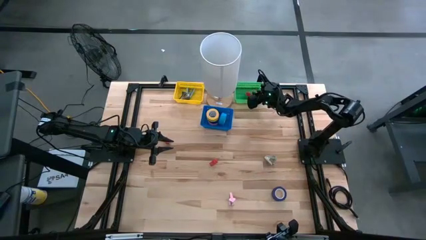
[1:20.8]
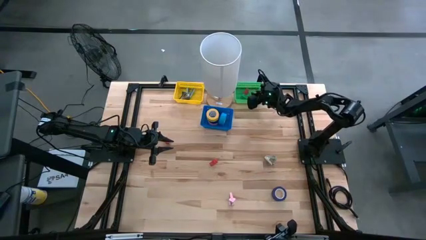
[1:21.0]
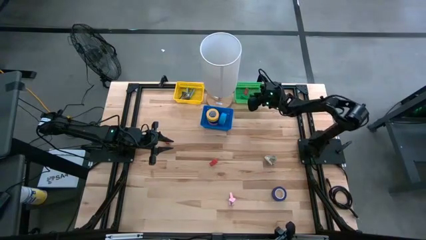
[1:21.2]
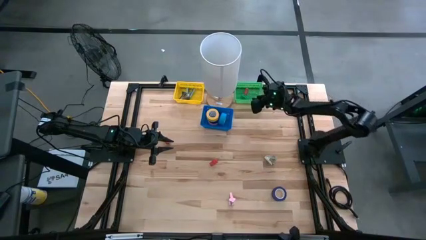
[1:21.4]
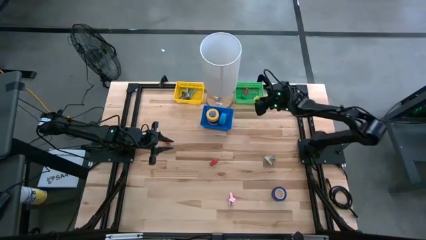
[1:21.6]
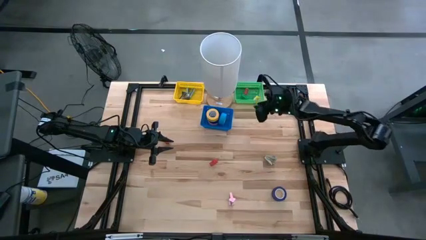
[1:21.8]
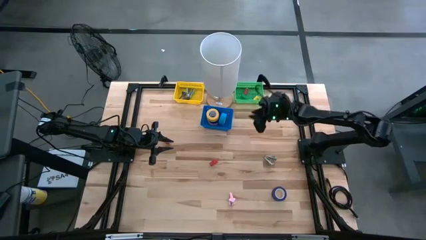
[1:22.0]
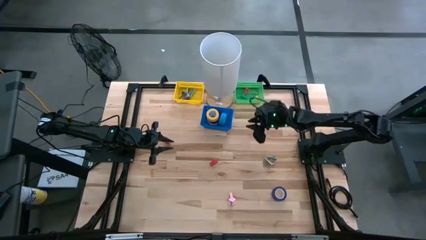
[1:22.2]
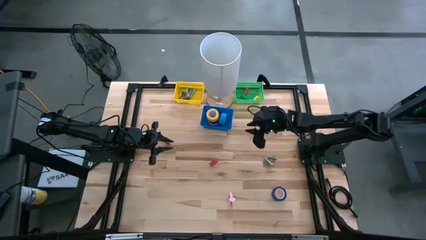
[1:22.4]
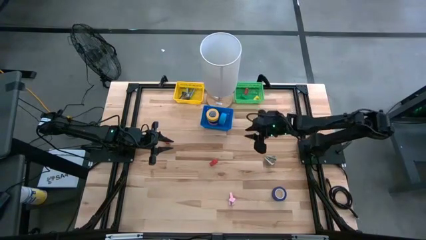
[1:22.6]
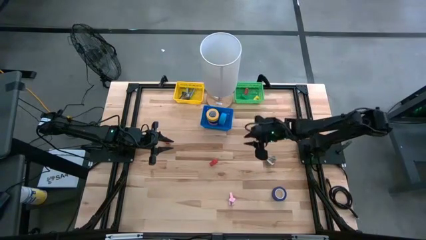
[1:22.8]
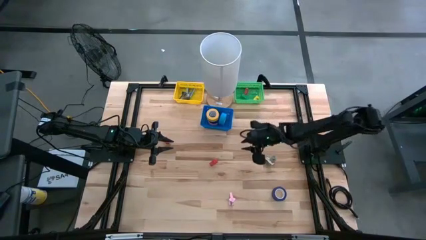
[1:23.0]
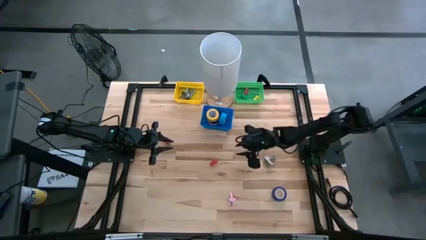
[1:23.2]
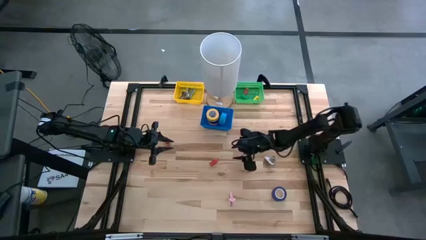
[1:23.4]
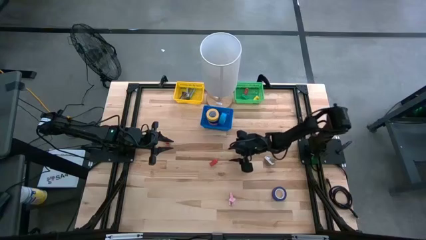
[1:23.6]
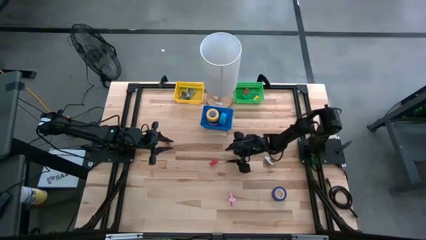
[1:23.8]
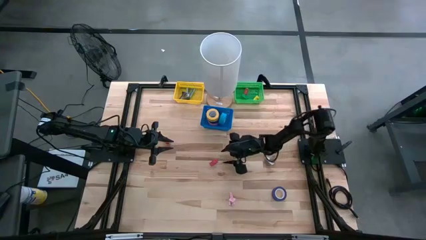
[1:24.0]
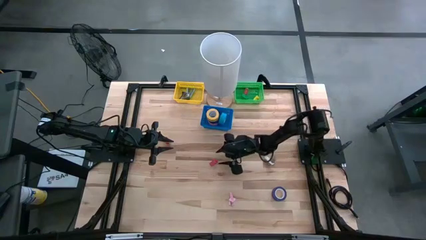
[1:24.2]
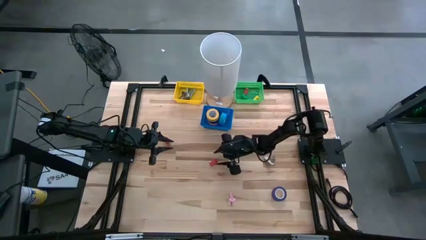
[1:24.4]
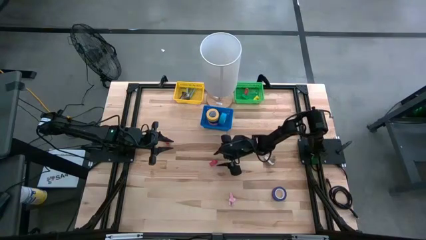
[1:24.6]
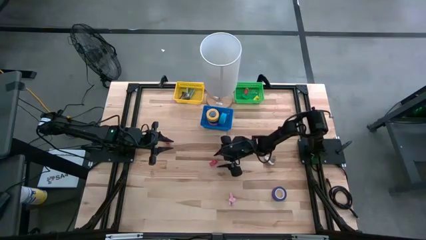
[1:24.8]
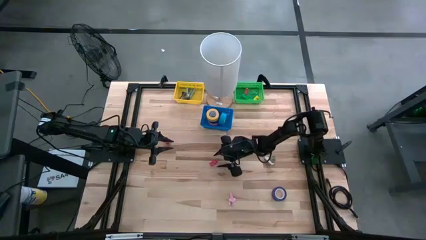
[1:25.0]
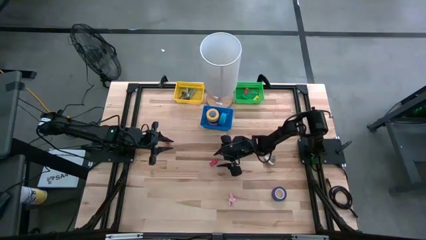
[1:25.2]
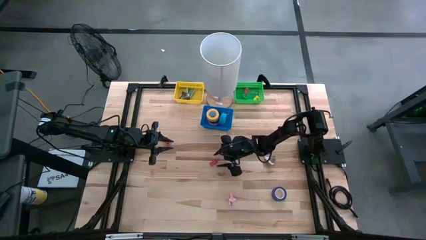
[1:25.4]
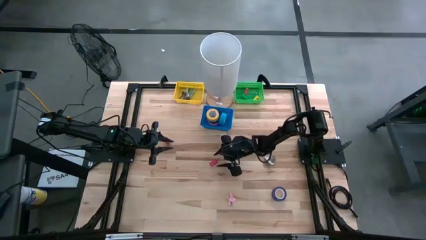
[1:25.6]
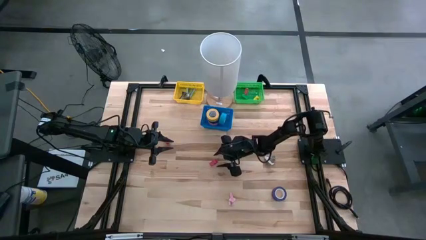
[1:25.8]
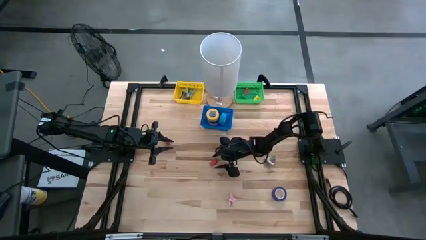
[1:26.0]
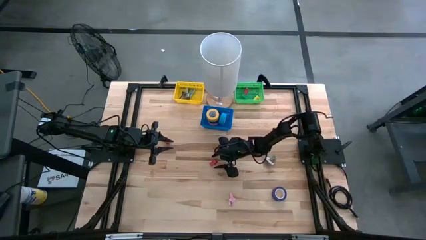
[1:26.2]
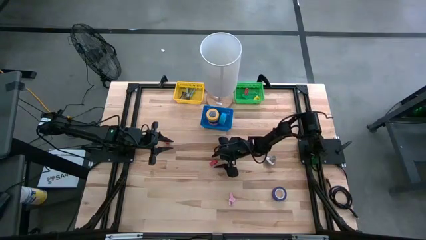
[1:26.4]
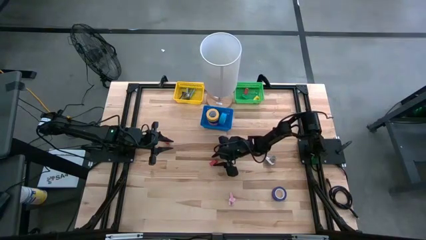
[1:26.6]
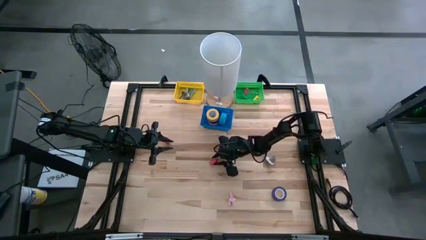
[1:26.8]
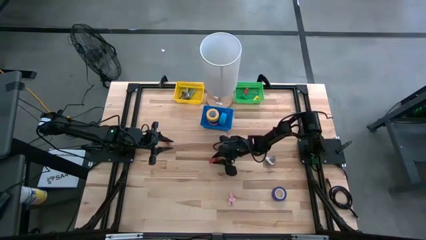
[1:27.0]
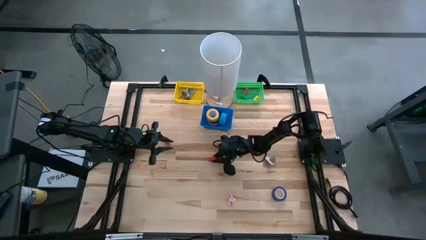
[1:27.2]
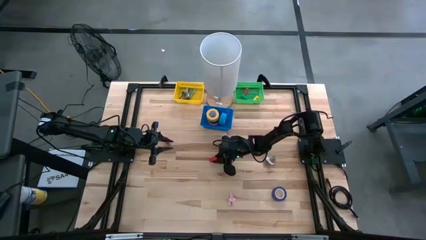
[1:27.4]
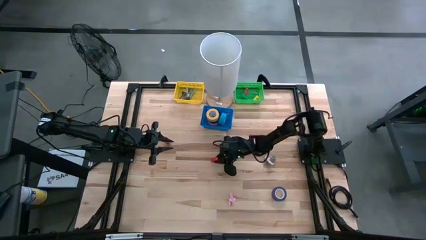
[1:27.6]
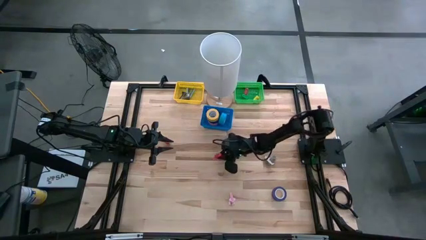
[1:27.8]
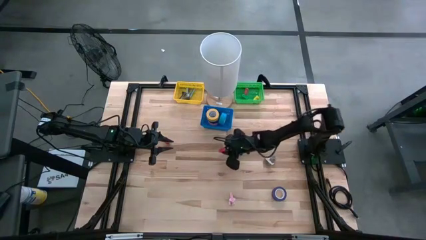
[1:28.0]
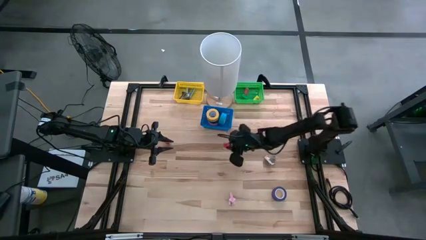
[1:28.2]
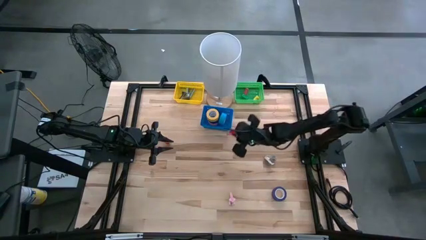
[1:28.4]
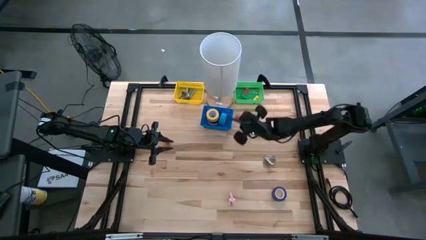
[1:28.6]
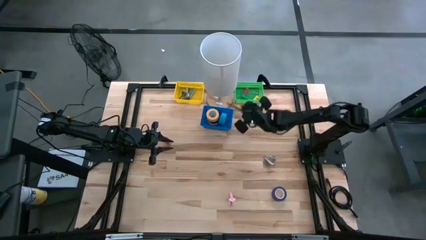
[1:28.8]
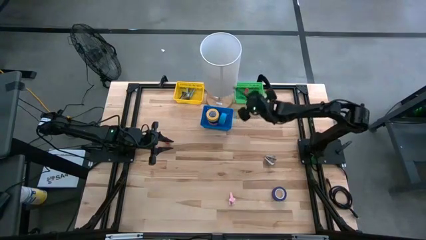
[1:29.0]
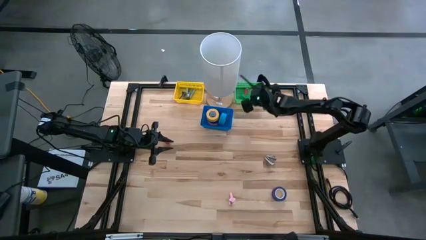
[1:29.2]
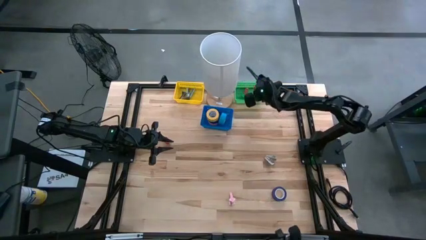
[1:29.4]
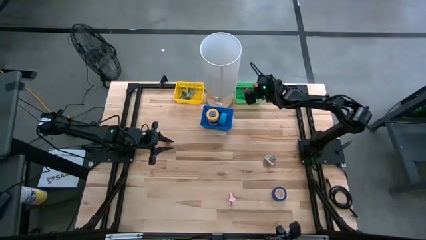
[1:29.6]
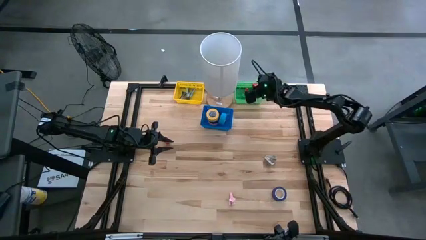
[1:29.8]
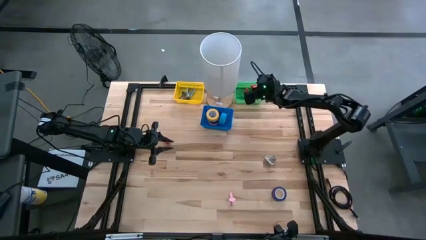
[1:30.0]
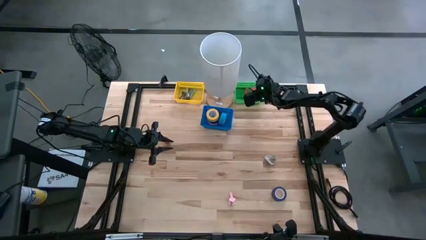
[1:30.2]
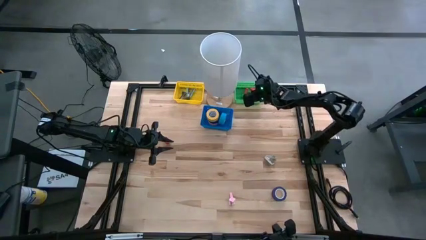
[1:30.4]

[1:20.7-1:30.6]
Task: Pick and place Stapler, Stapler remover, tape
Put the right red stapler into the green basket

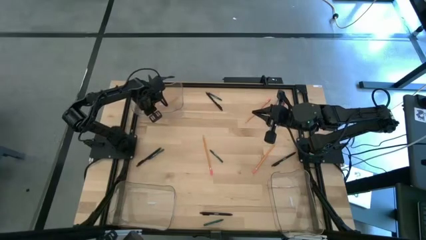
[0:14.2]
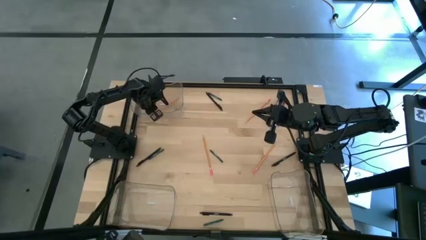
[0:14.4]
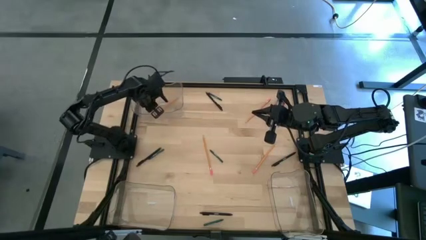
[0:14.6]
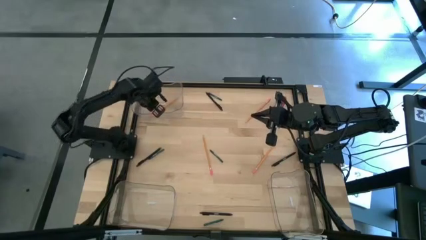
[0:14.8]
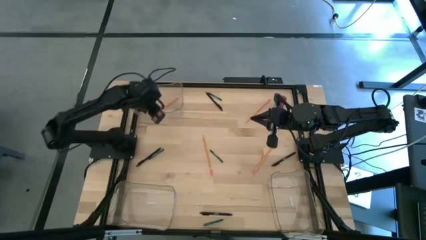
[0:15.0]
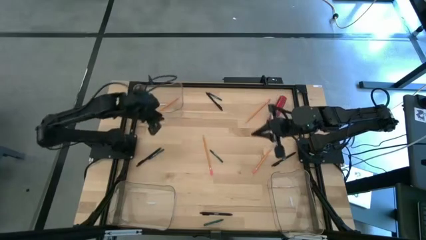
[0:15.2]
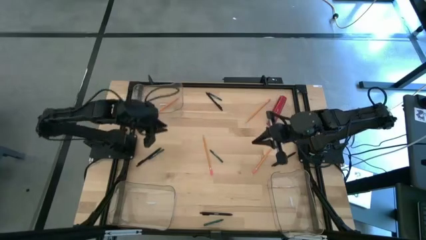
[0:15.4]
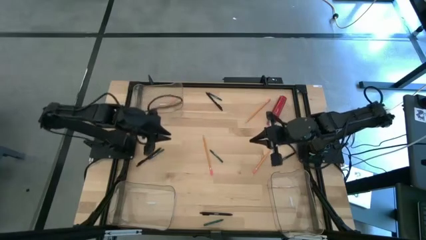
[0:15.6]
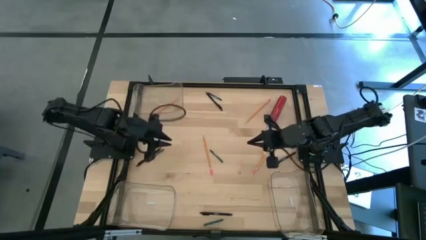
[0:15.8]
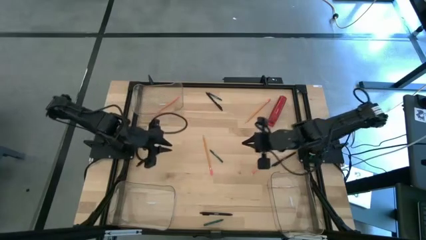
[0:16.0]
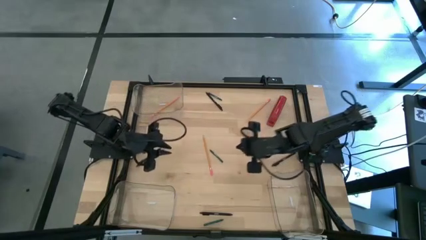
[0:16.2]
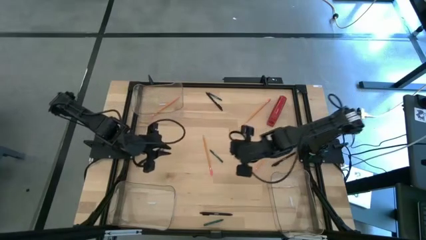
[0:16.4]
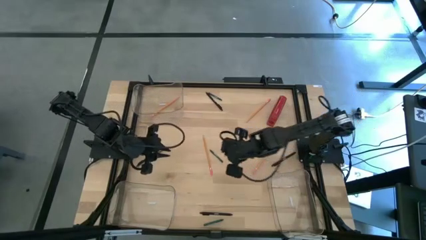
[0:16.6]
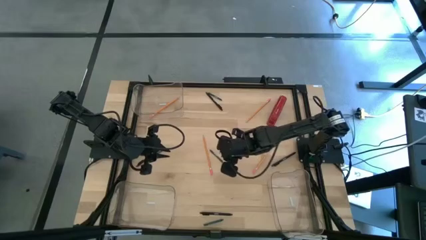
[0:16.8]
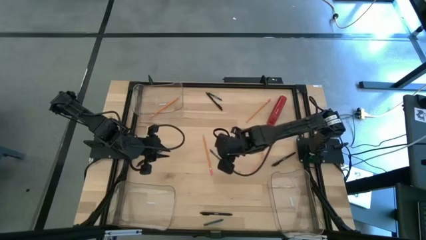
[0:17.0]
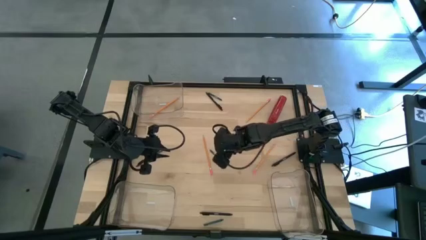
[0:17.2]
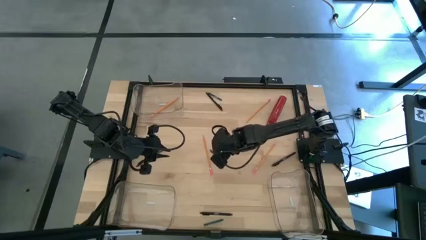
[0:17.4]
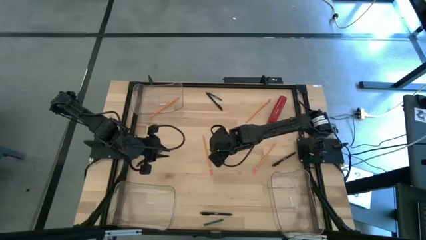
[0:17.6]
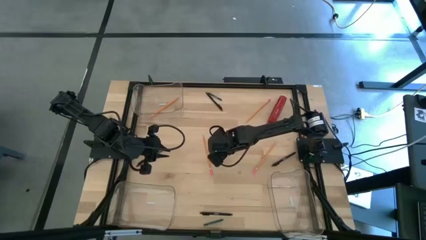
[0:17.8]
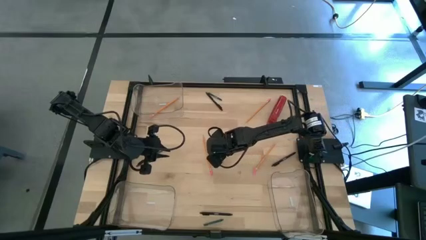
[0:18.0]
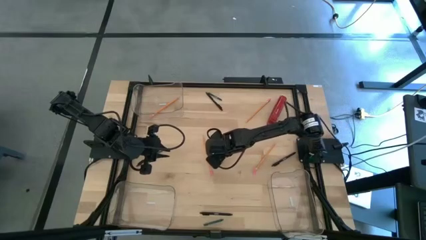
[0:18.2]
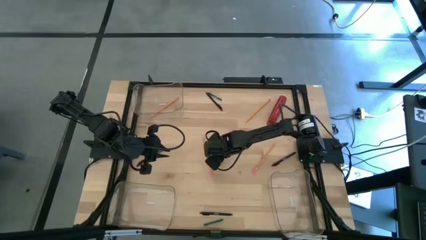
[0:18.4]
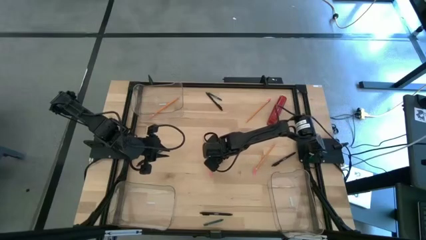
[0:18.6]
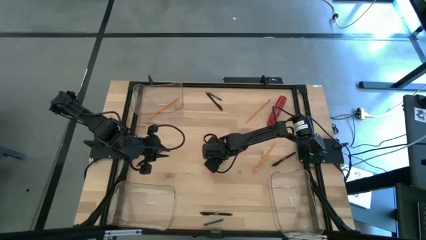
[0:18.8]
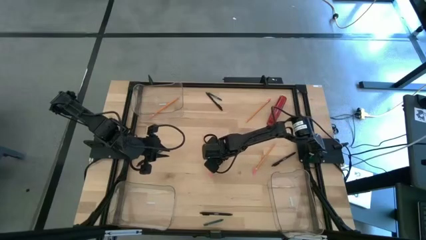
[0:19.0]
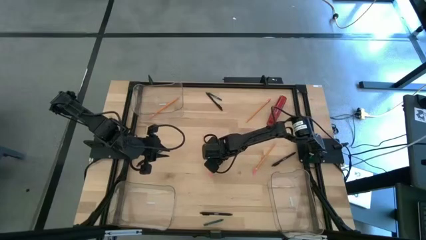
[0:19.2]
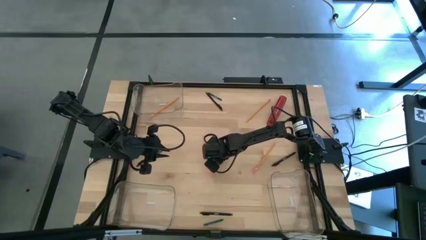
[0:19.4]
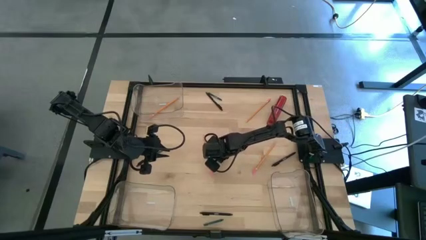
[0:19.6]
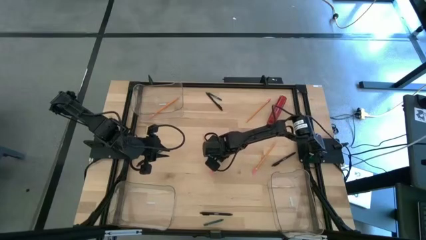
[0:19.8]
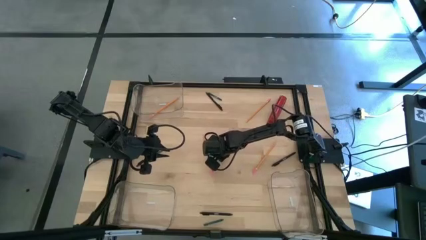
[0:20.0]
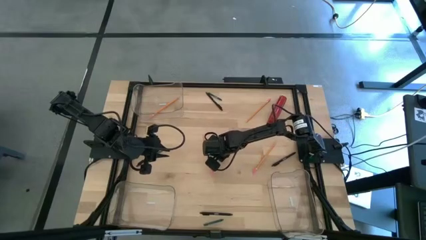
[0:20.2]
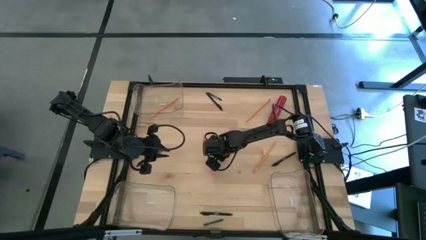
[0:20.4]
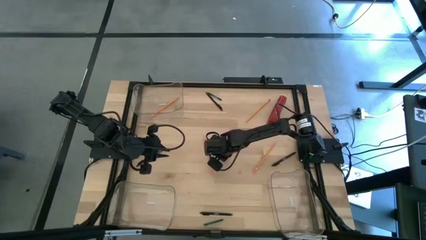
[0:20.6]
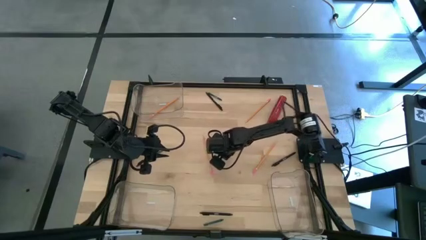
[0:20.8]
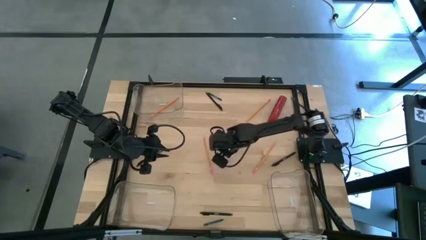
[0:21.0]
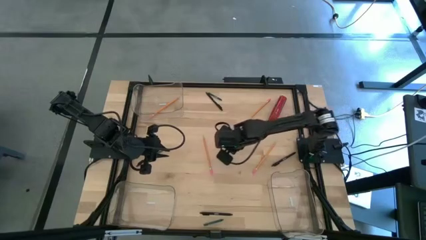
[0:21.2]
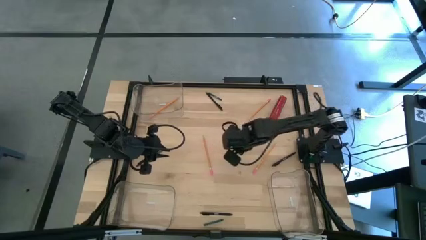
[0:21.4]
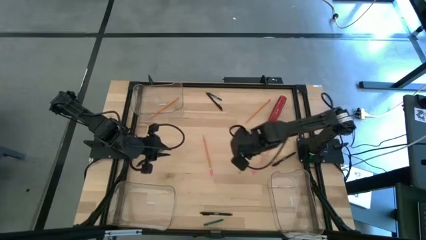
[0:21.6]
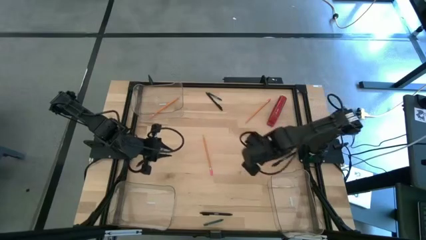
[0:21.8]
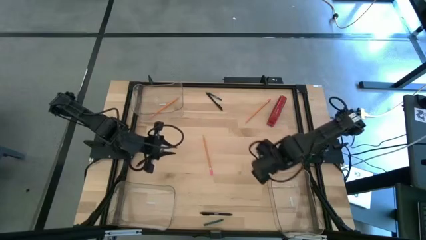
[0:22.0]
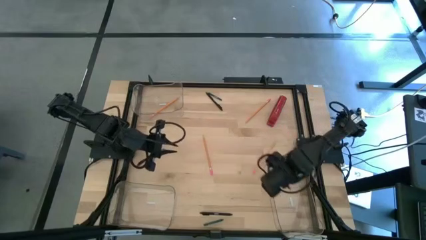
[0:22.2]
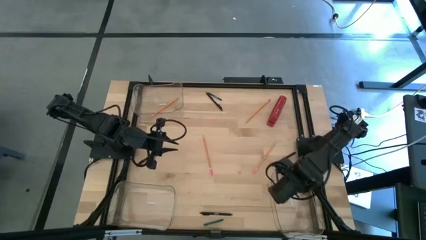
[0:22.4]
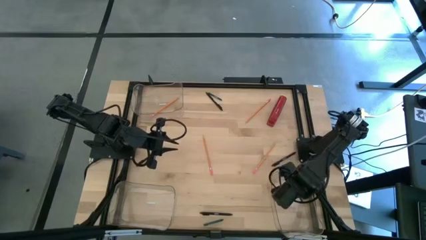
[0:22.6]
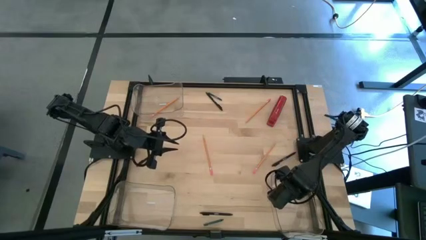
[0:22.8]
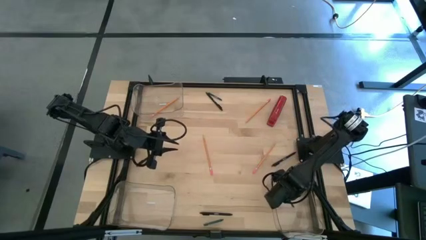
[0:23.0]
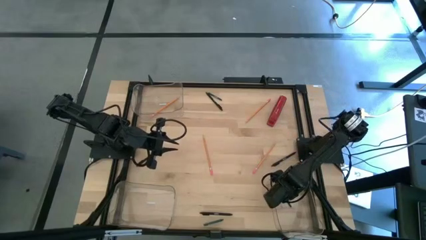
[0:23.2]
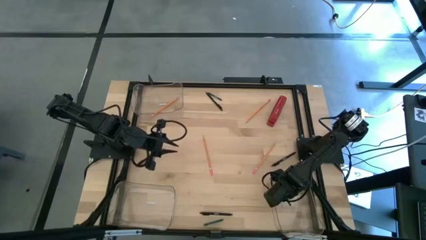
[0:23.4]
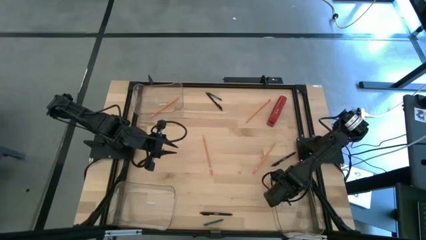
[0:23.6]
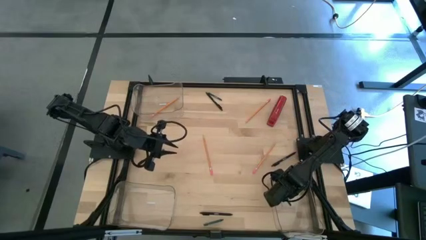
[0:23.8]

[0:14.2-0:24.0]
Task: Sort crayons/erasers/pens/pencils in bins
Put the green crayon into the bottom right transparent bin
